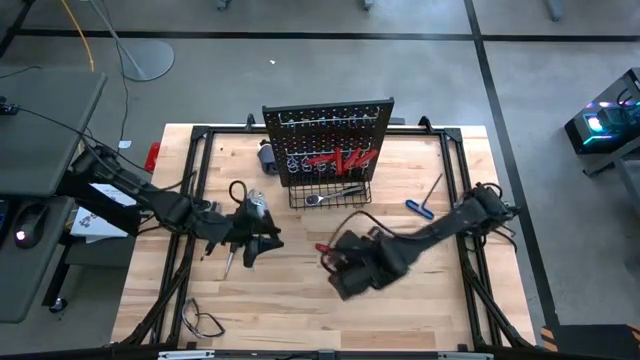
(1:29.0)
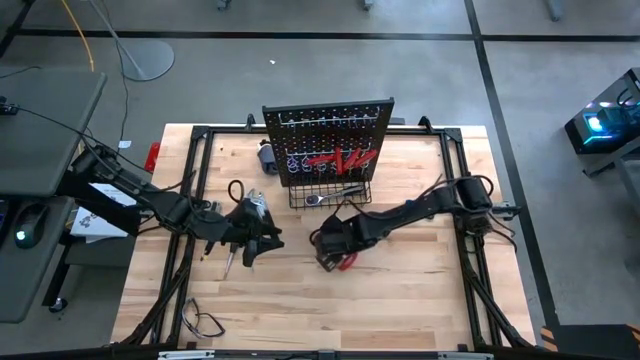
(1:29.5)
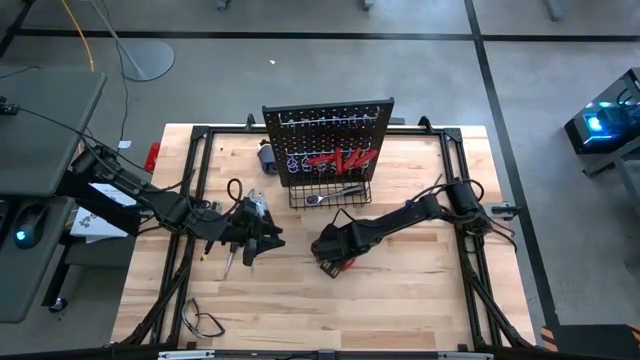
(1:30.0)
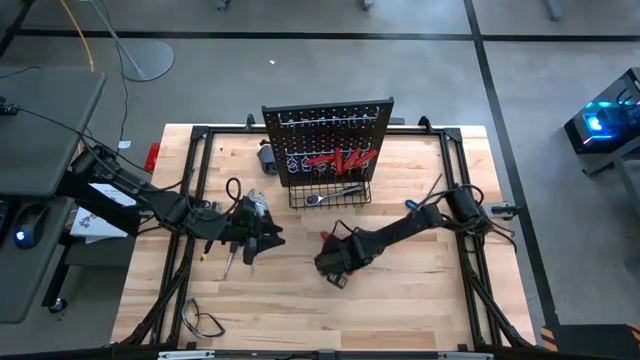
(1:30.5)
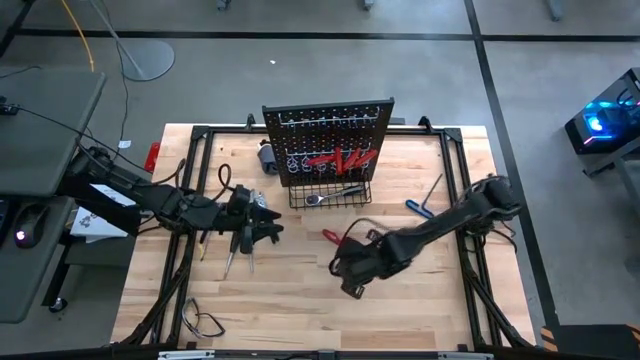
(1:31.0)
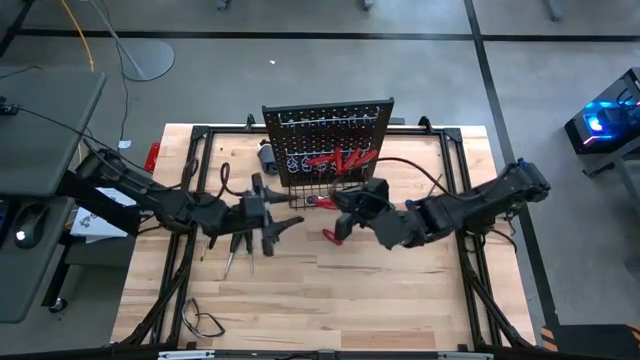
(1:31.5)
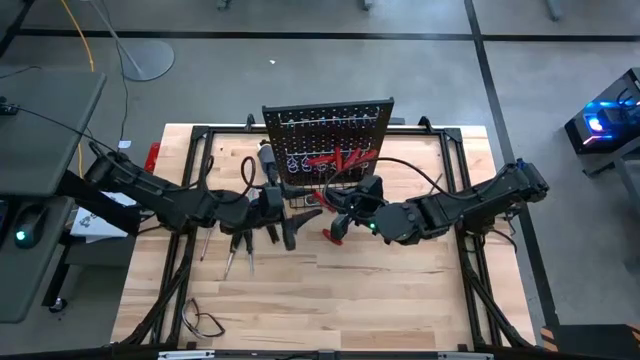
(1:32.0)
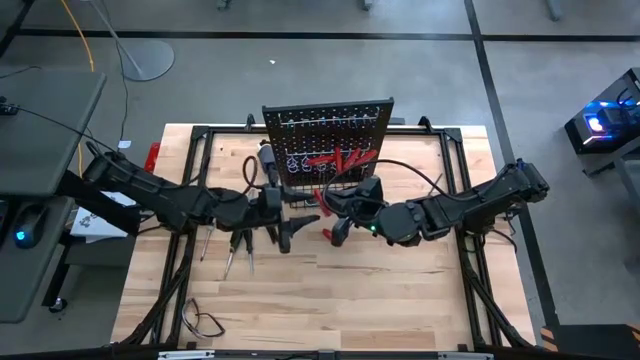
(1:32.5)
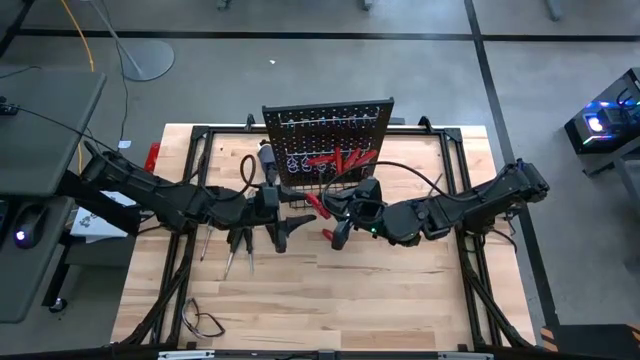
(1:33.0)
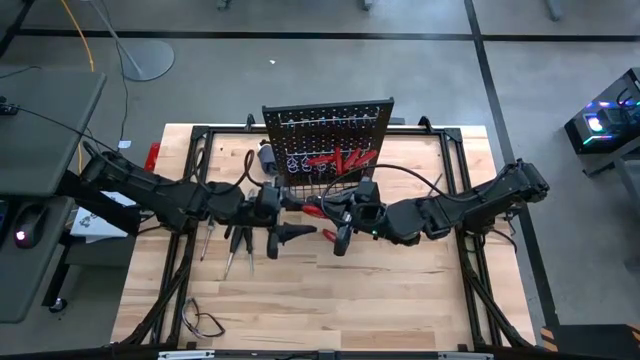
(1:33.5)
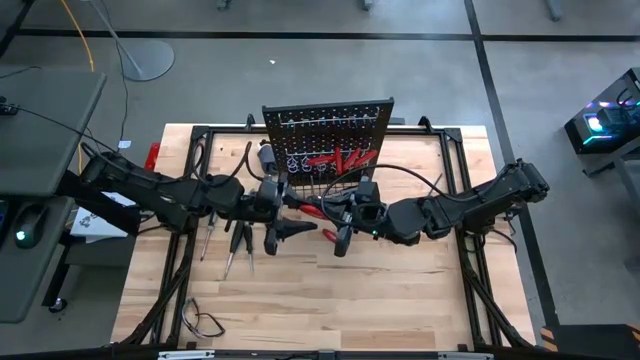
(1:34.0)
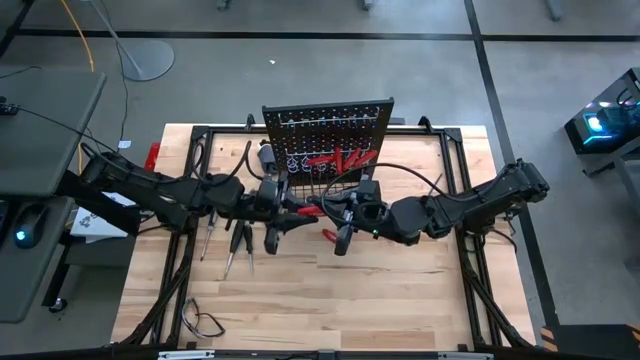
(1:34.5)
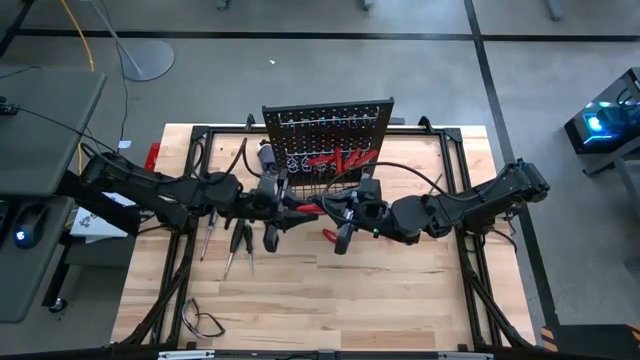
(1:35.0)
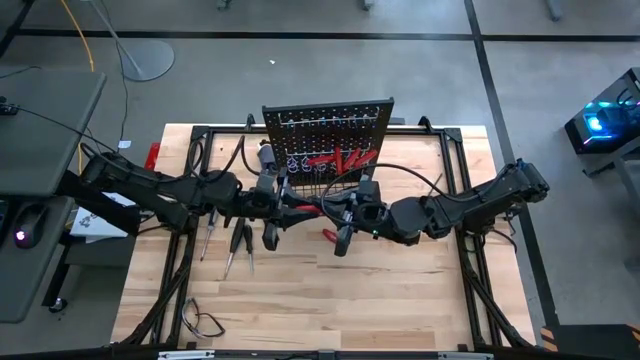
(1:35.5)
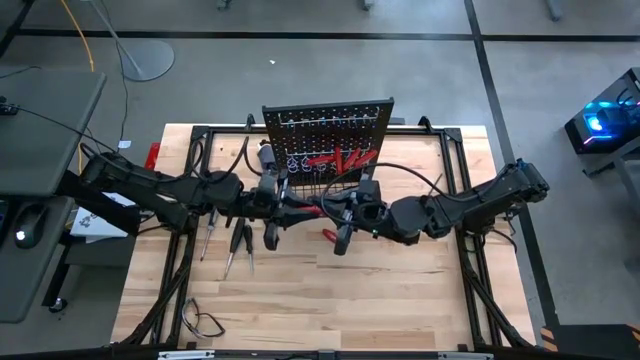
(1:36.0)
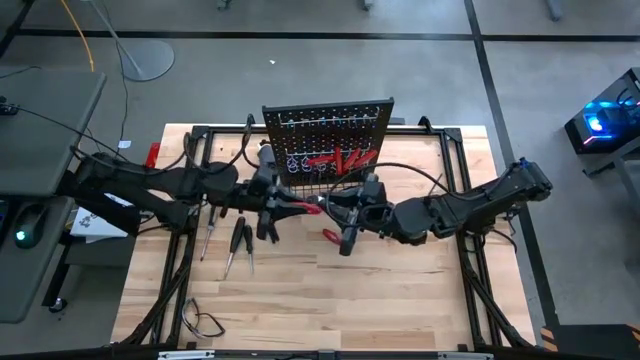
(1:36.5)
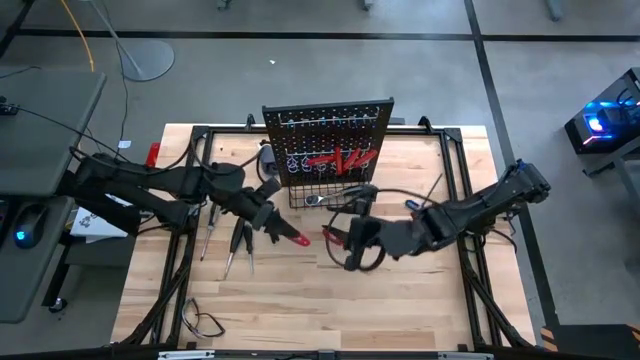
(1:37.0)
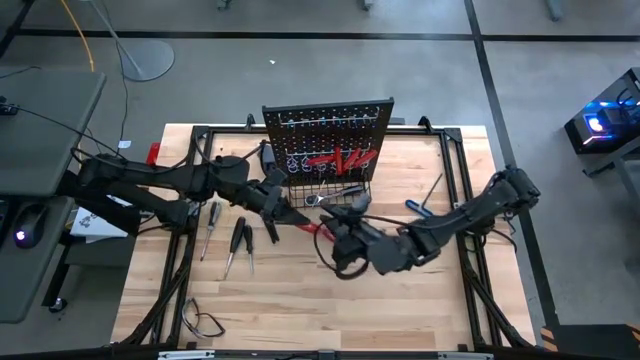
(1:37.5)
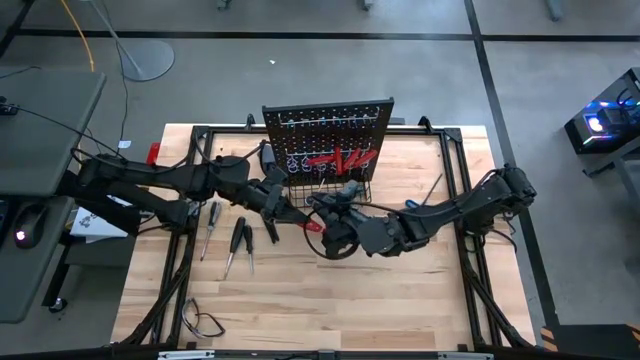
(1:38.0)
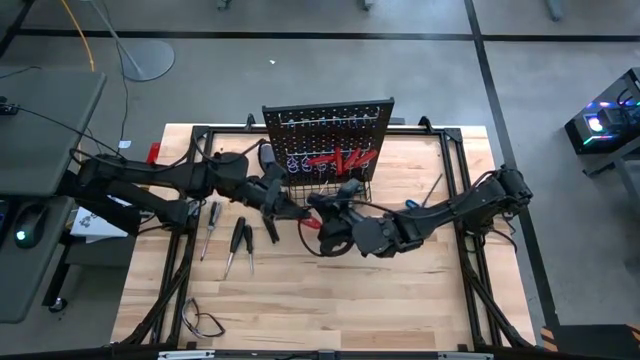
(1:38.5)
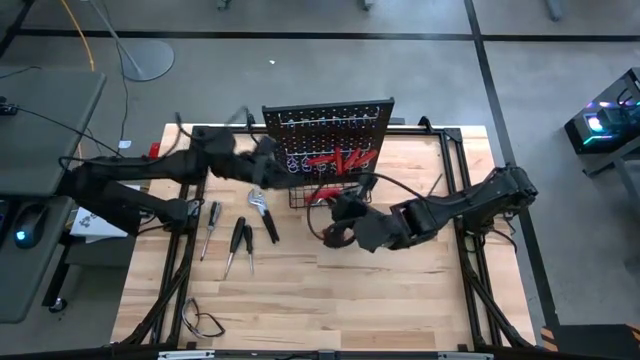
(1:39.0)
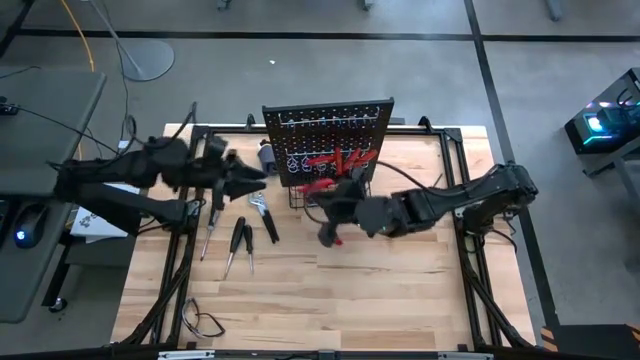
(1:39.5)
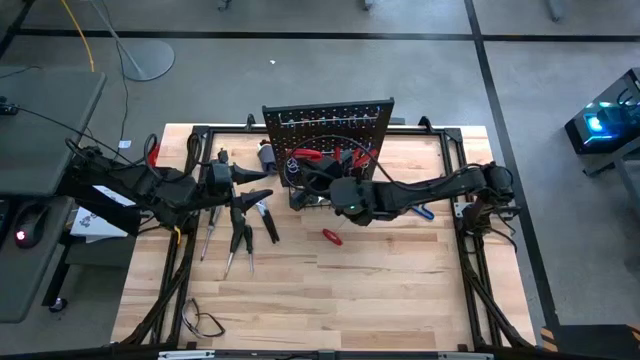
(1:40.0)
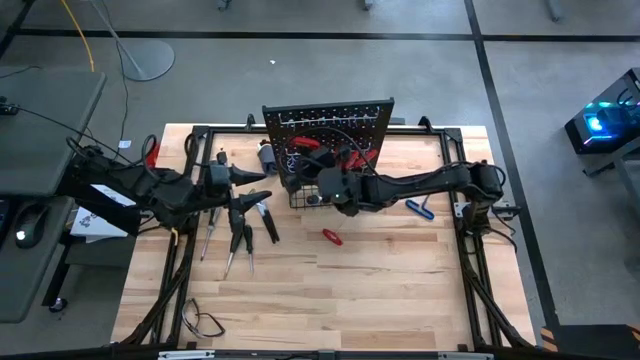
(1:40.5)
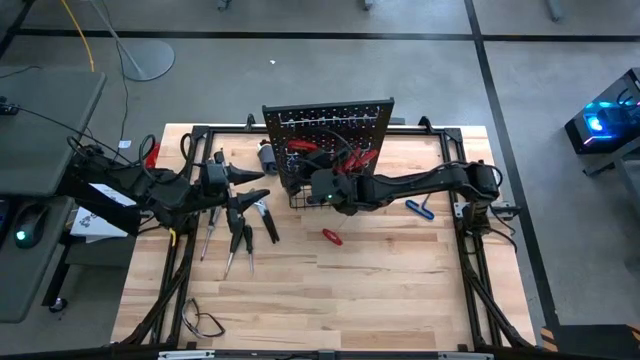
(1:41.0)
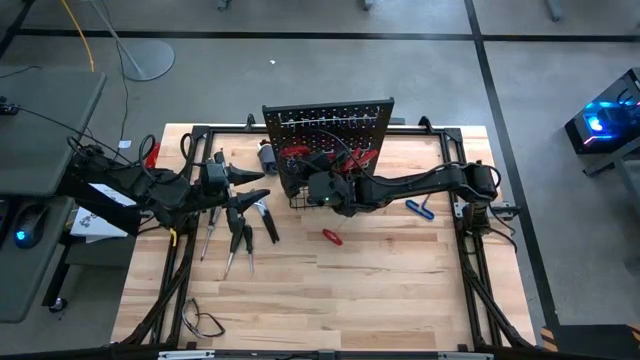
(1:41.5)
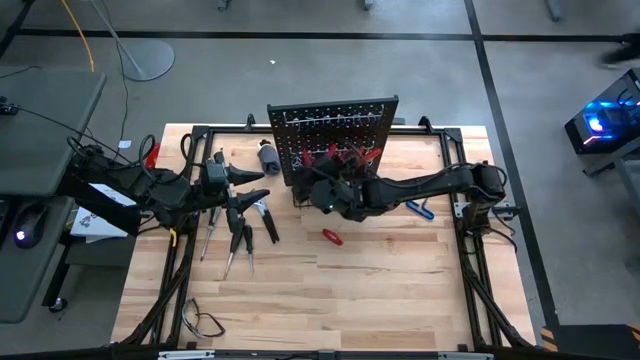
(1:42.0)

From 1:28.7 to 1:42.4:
Task: Hang tools onto peg board
Hang the red allen wrench on the peg board

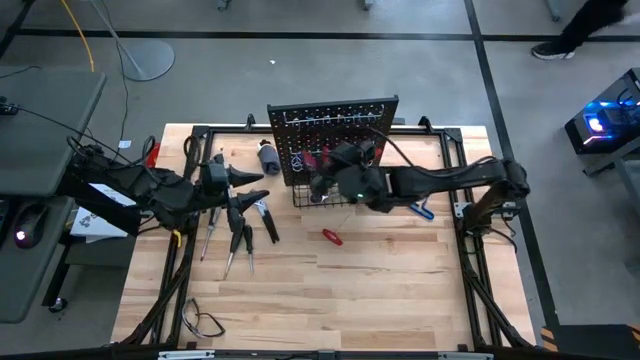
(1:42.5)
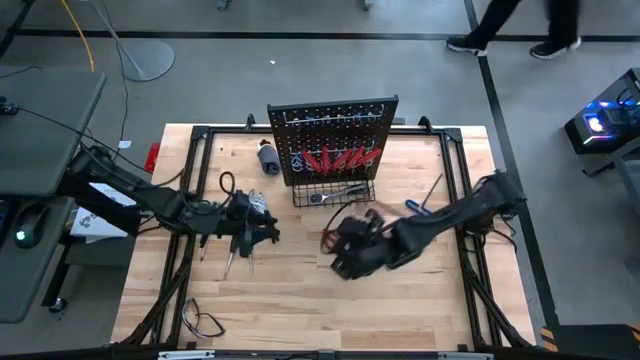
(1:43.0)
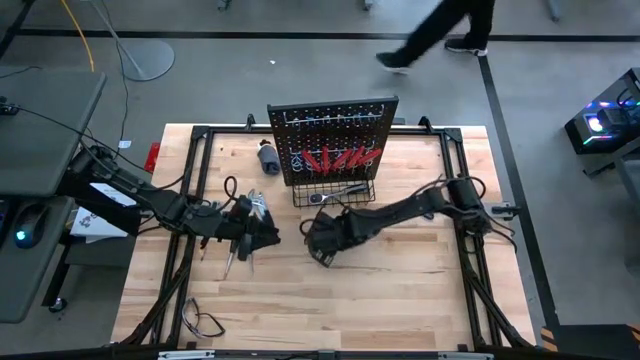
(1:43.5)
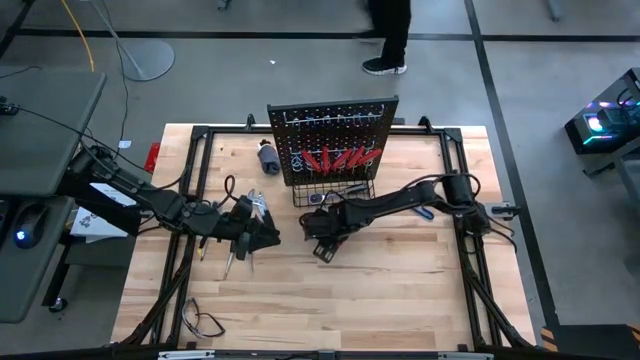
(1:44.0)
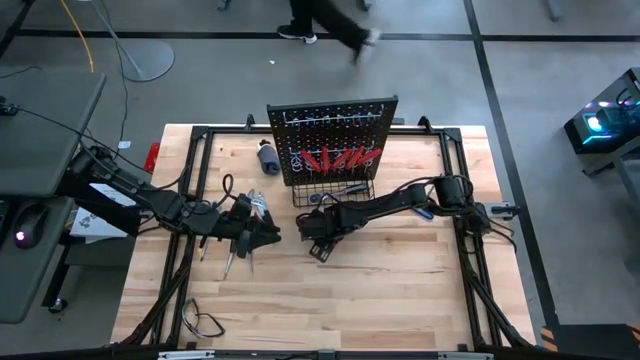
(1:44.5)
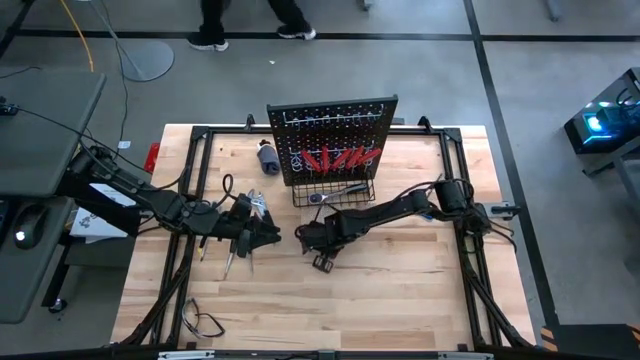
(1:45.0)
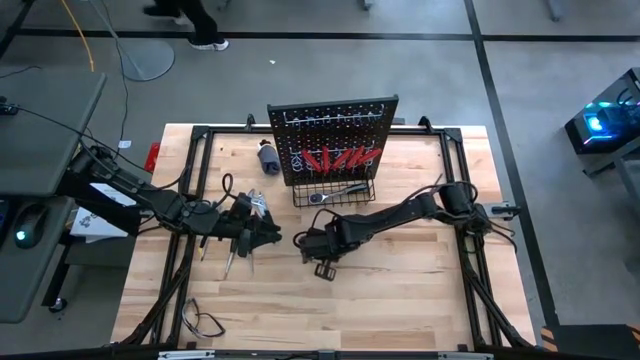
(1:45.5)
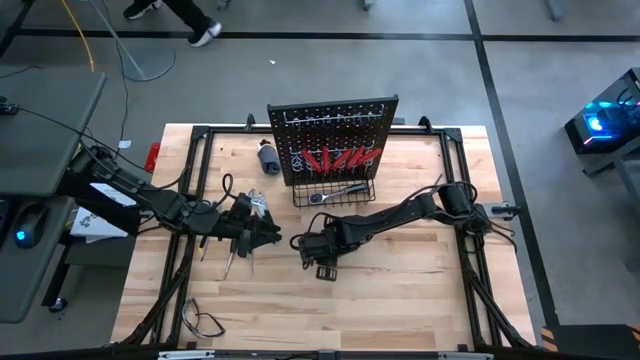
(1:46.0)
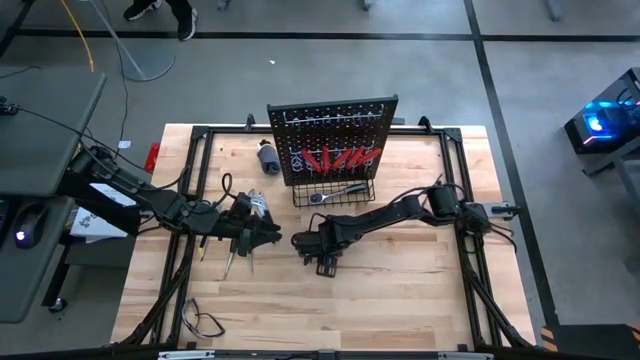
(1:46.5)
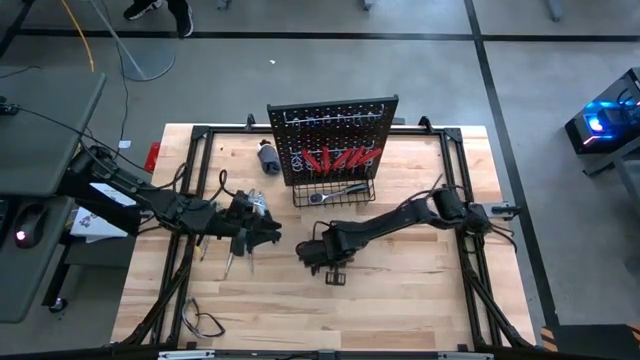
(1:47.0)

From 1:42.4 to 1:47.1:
Hang the red allen wrench on the peg board
